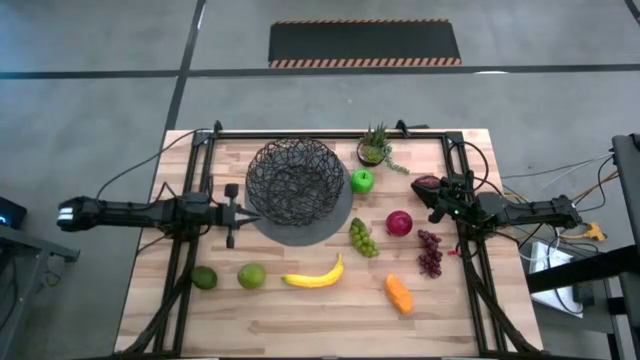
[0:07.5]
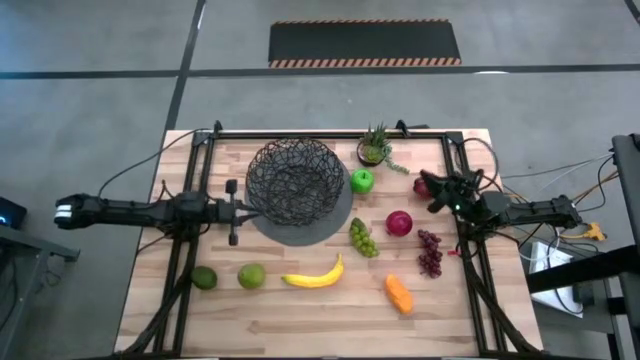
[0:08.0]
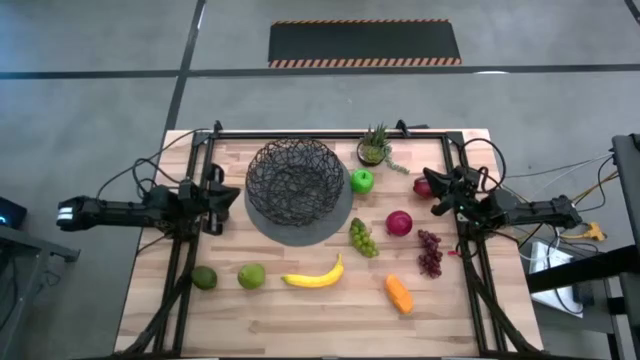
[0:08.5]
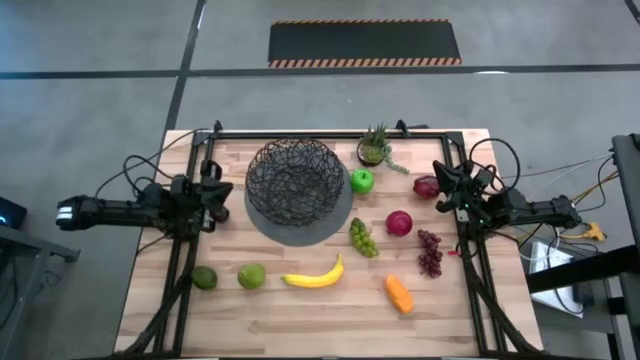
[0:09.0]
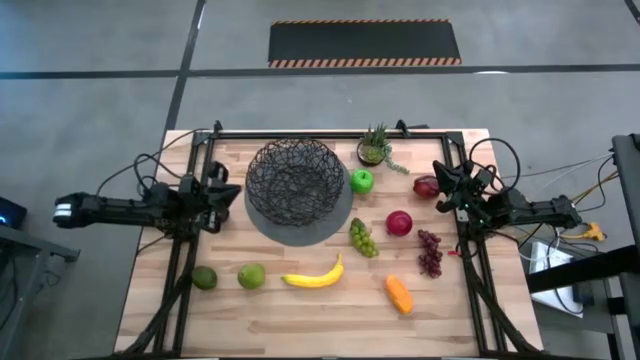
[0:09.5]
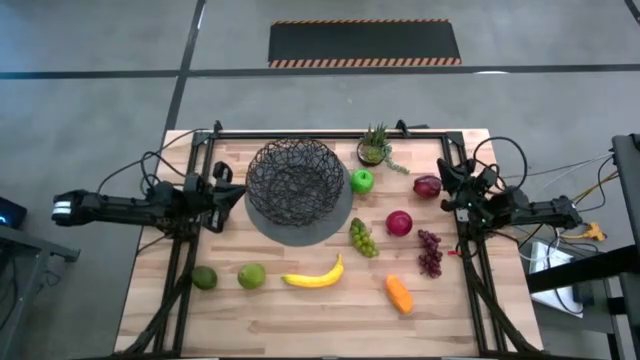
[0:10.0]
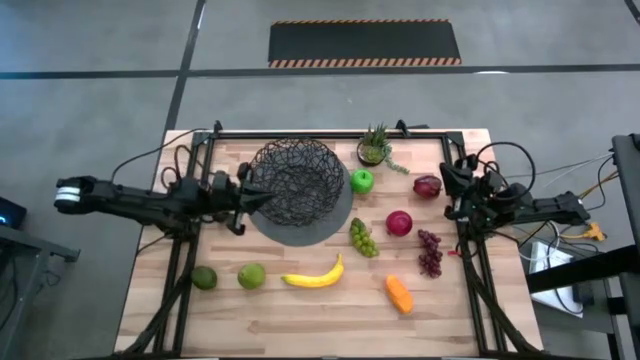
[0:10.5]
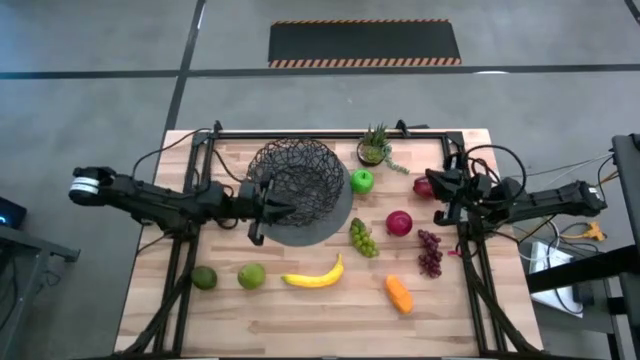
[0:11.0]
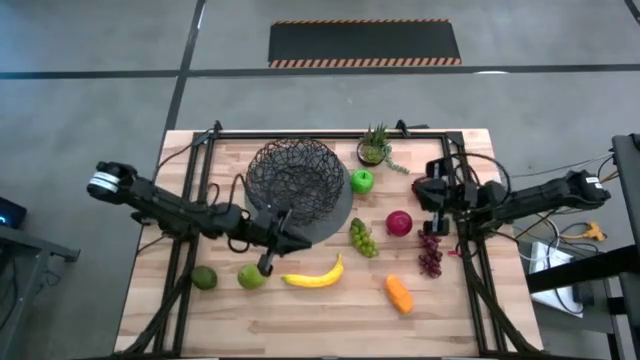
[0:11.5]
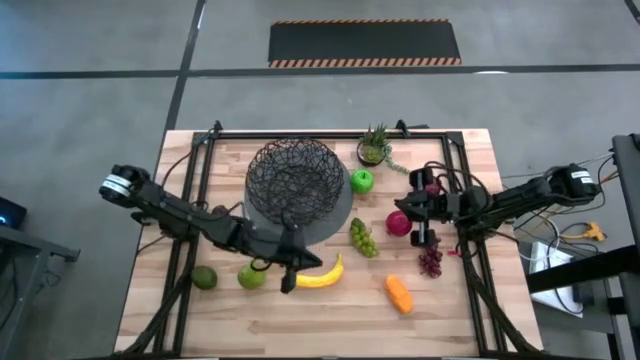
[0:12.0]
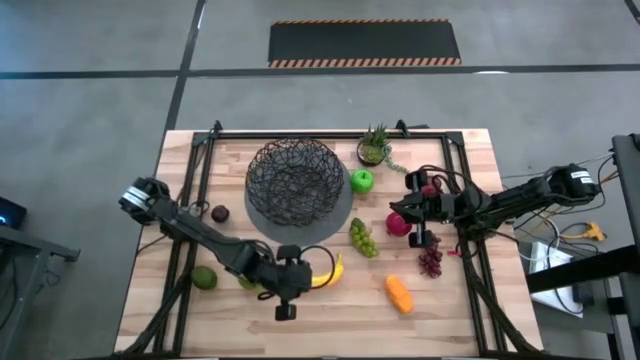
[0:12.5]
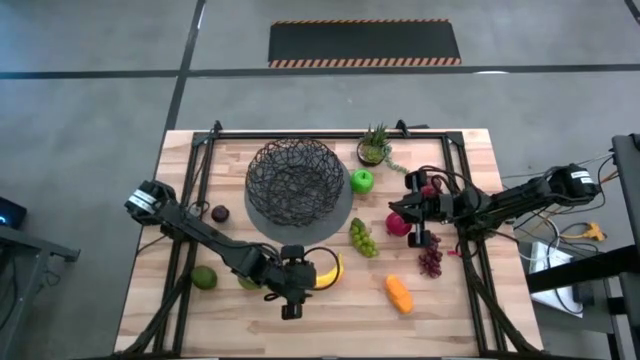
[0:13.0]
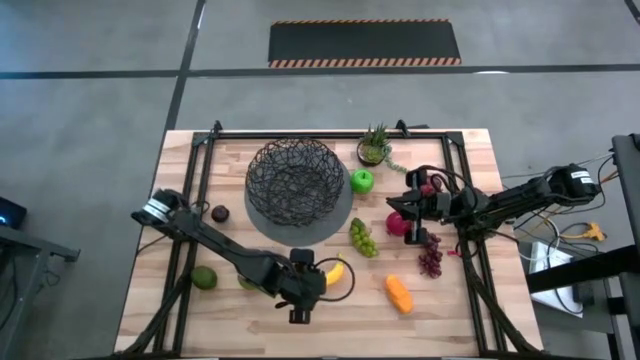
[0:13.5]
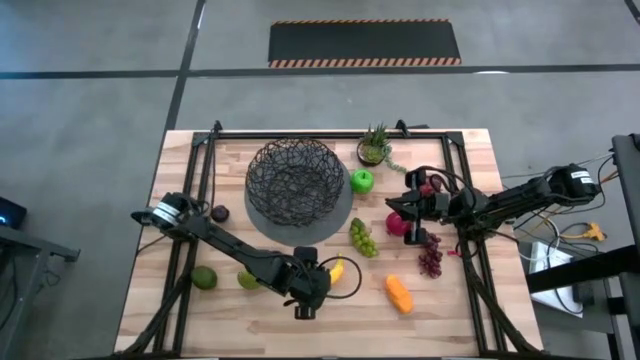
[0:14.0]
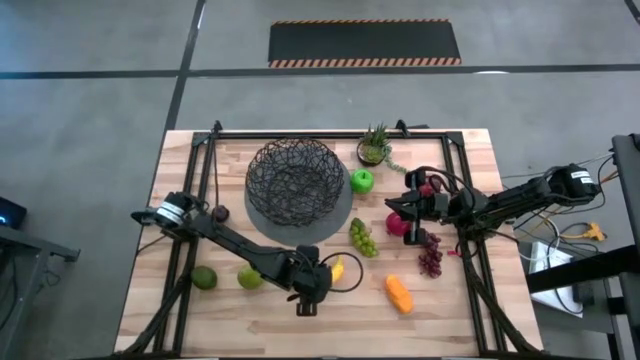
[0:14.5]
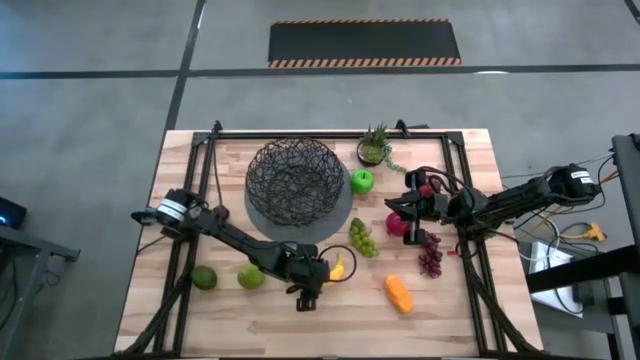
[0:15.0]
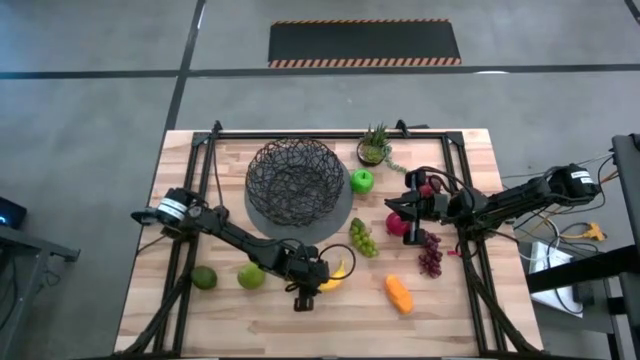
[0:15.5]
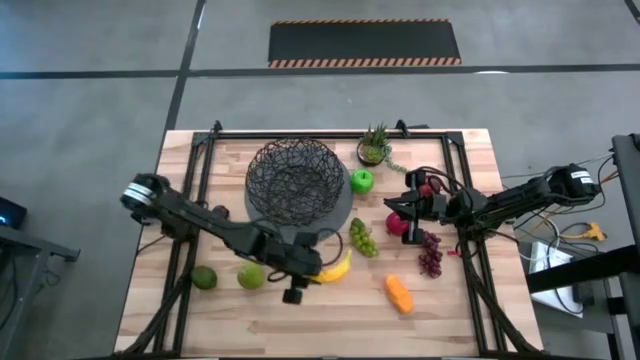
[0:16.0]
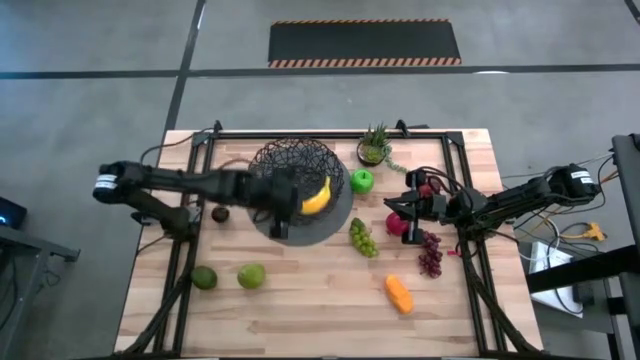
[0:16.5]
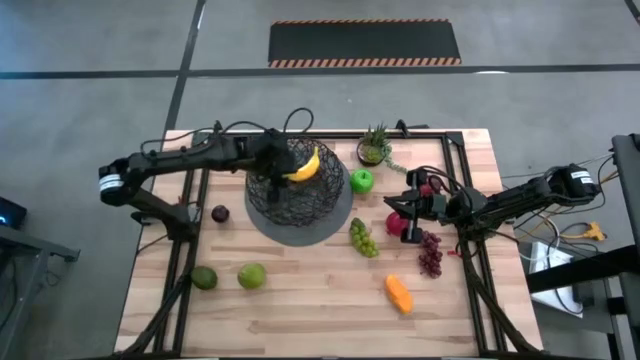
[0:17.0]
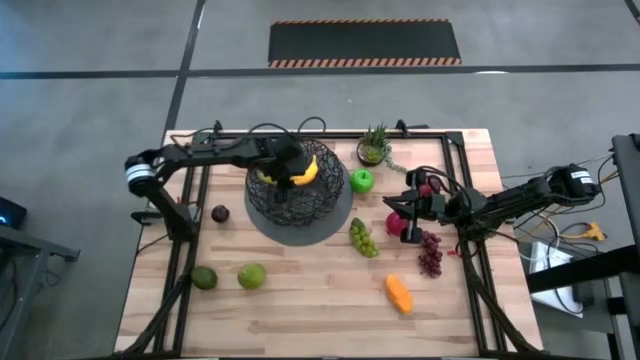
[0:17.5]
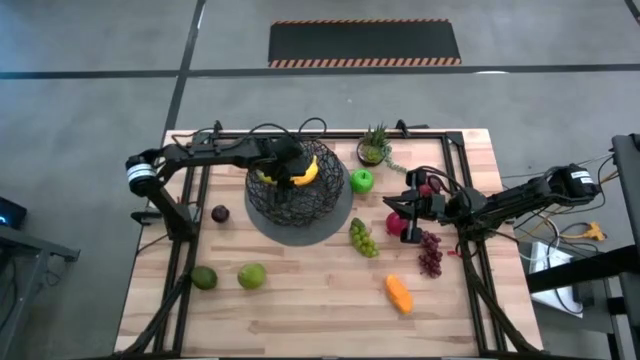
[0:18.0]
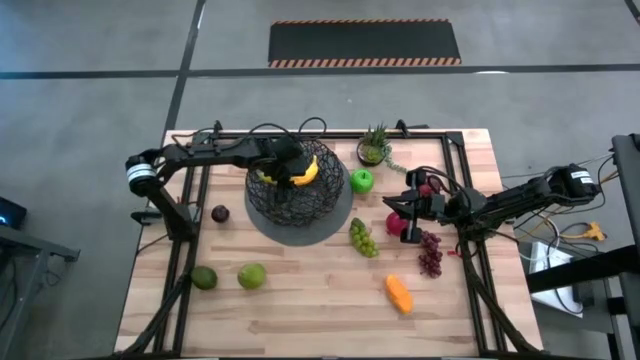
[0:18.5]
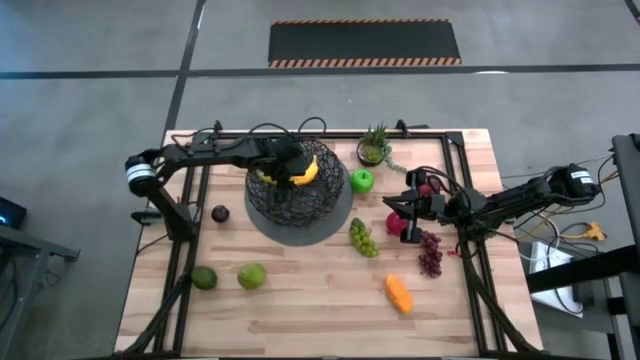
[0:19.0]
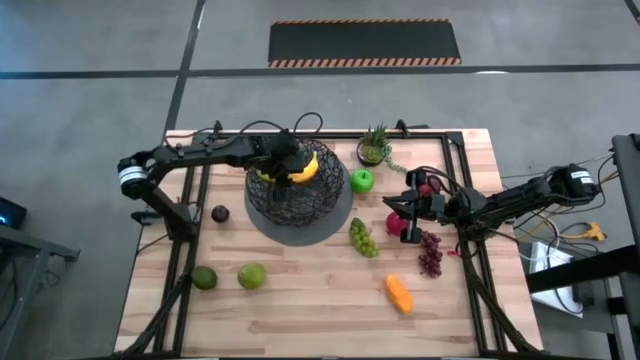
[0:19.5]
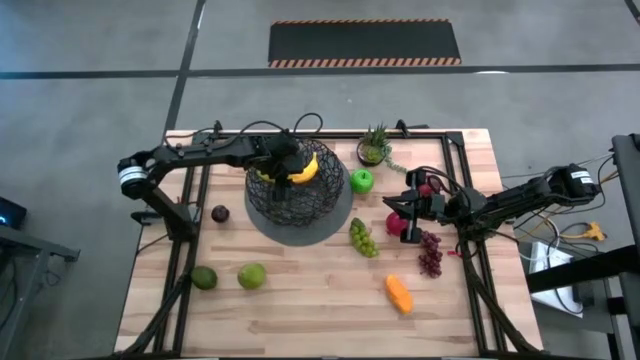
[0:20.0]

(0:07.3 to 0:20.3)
Task: Build produce basket
Put the banana into the black wire basket

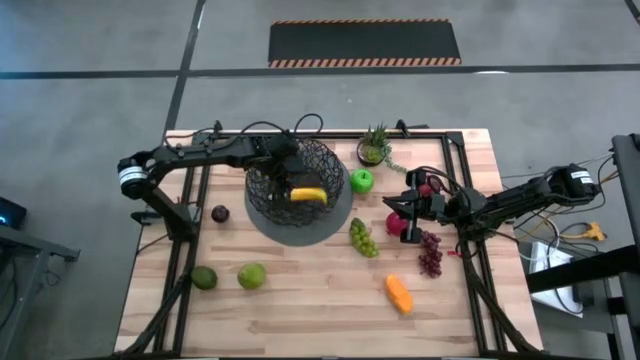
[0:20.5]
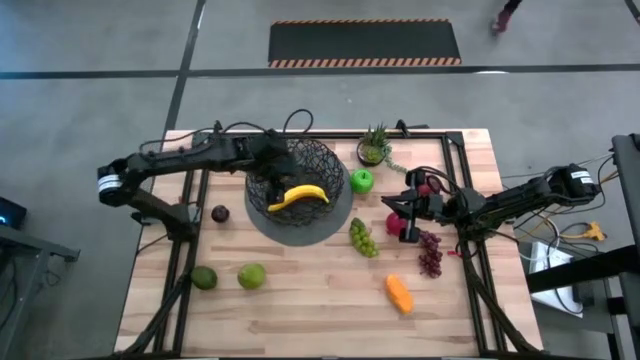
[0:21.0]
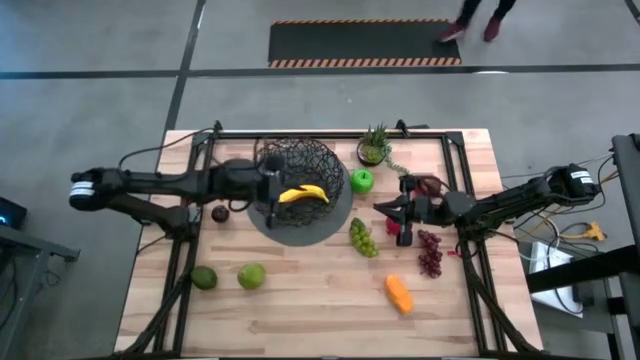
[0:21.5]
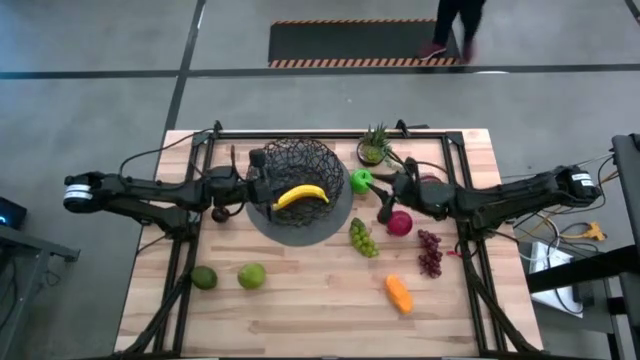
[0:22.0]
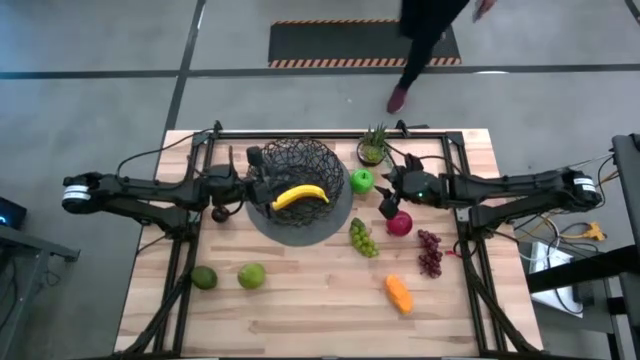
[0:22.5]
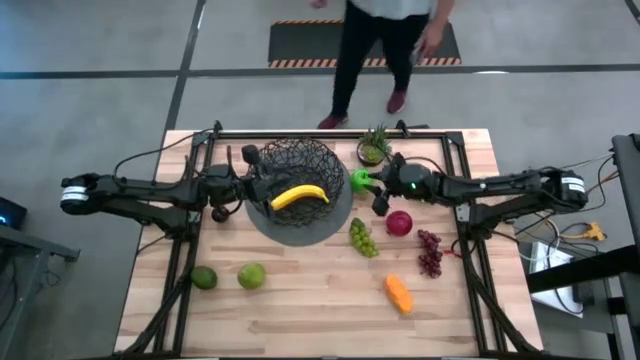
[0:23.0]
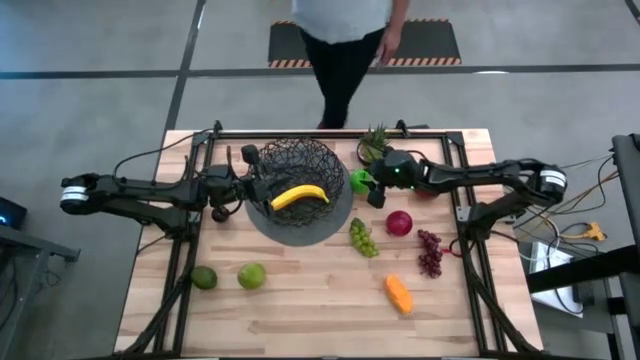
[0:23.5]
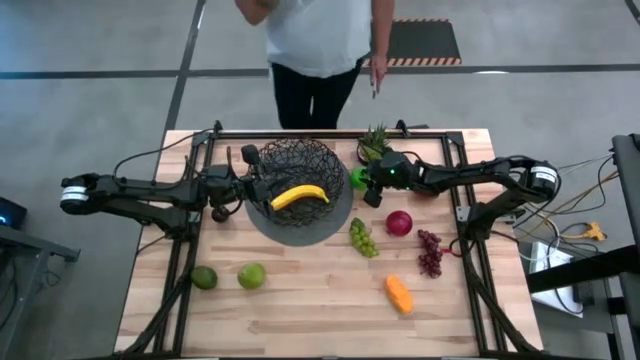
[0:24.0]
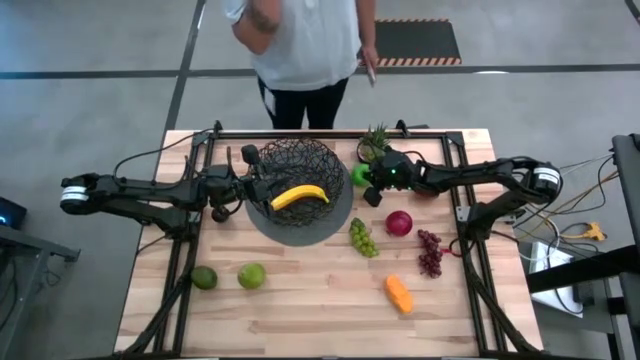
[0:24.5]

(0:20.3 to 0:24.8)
Put the green apple into the black wire basket

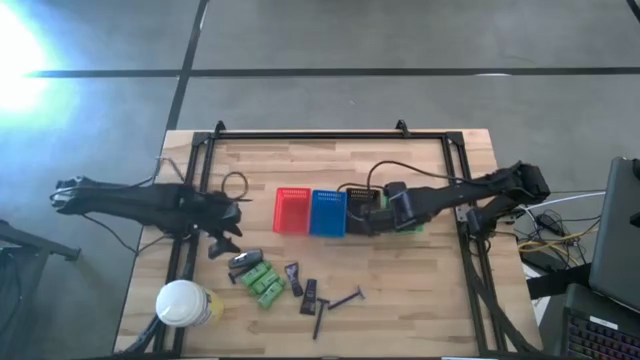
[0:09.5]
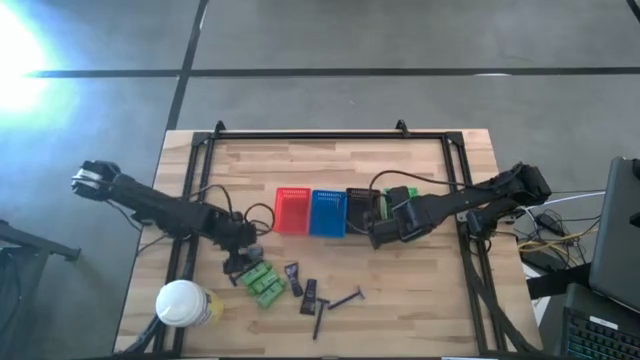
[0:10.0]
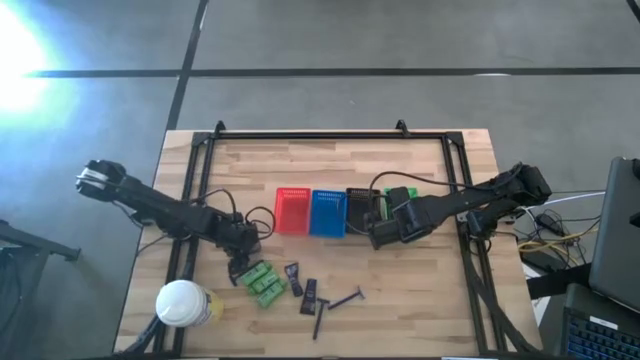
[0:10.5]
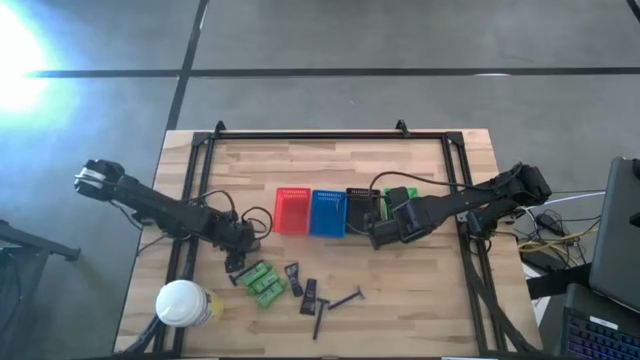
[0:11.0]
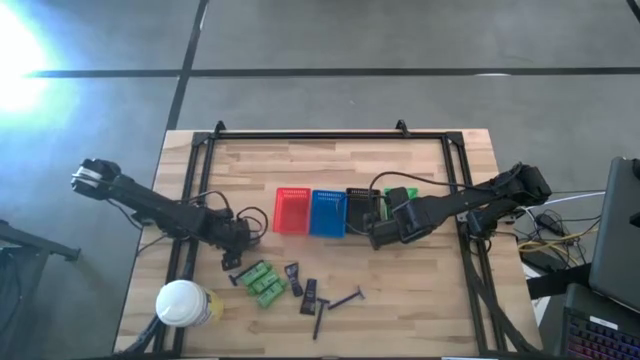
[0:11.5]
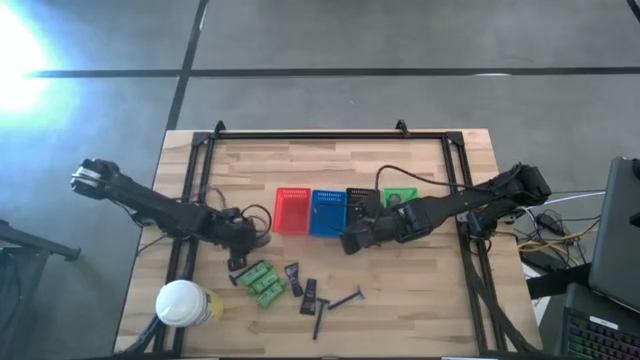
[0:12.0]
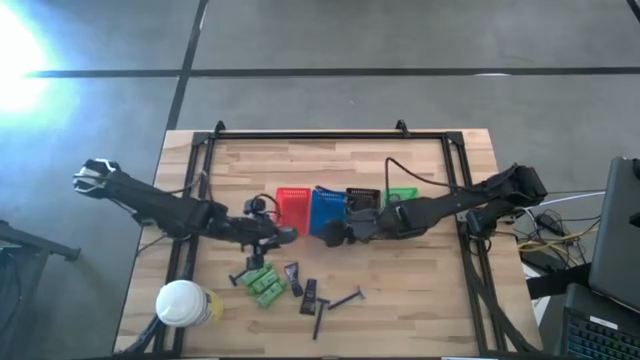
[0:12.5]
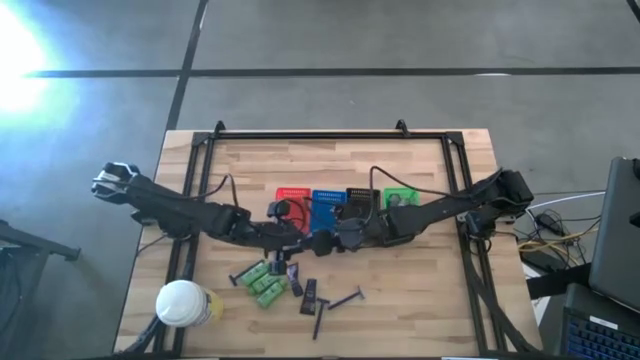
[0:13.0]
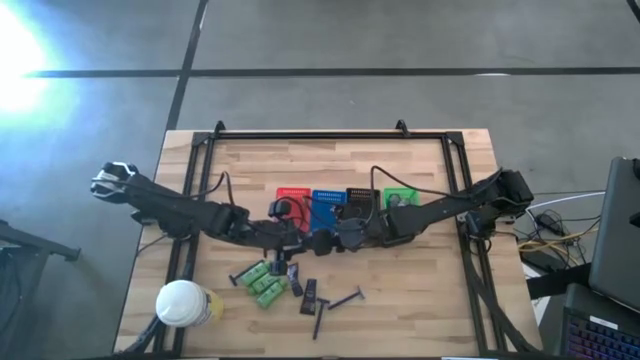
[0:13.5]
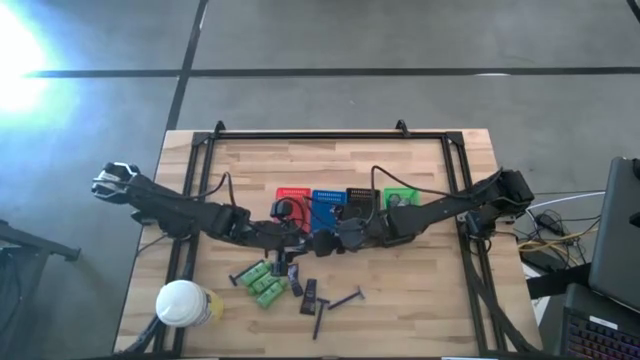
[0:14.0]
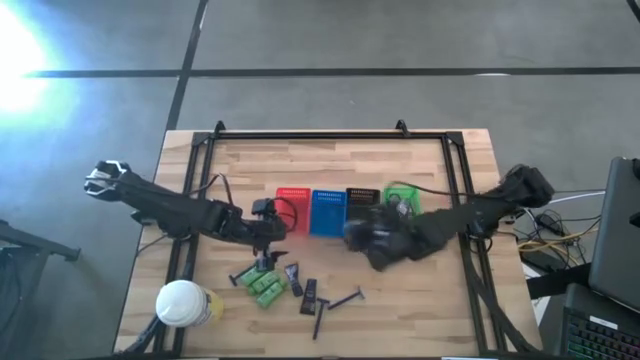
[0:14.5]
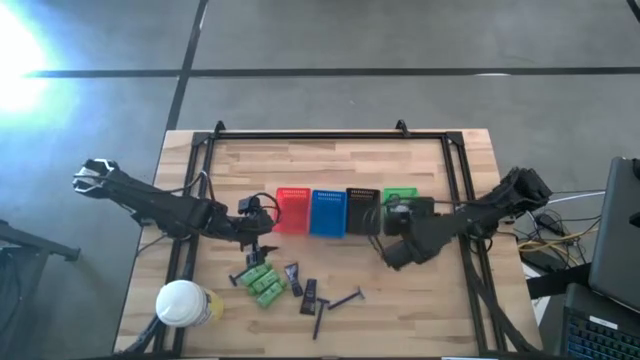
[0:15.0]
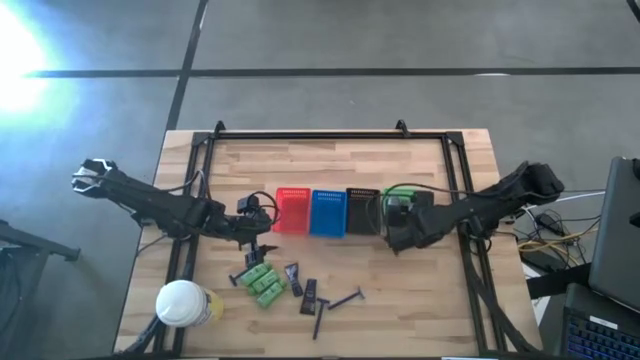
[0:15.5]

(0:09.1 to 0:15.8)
Task: Pick & Place Travel size toiletries
Put the black deodorant into the green bin
